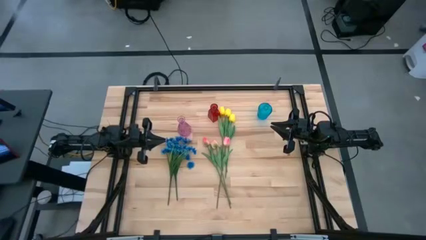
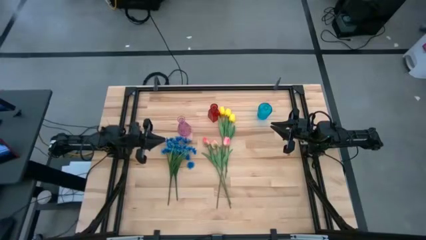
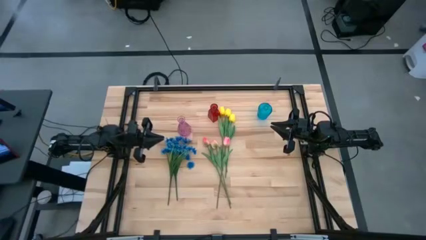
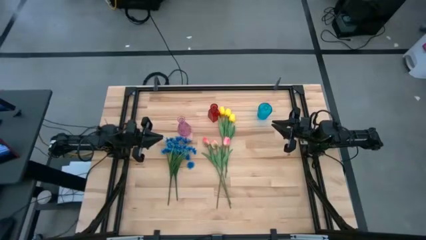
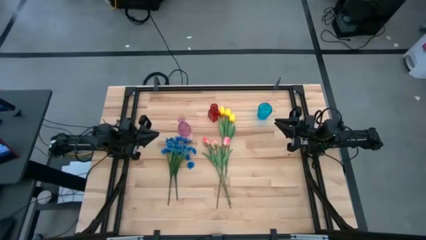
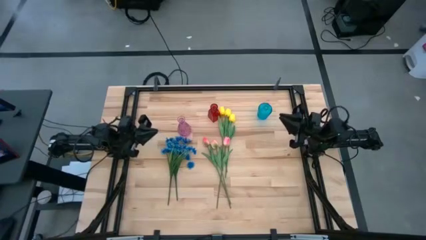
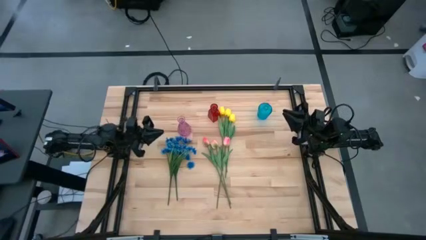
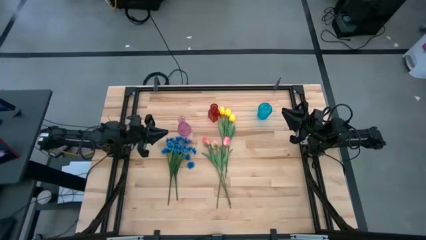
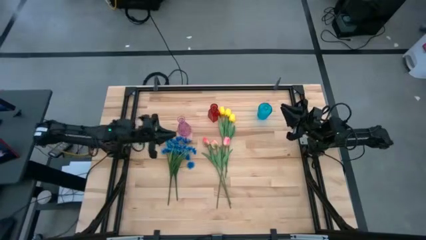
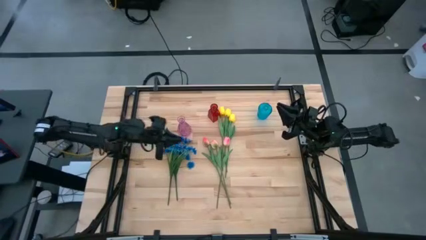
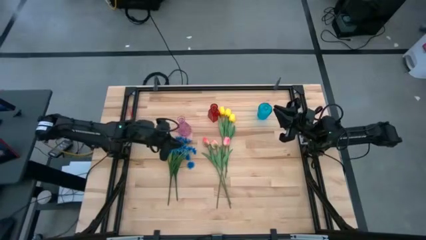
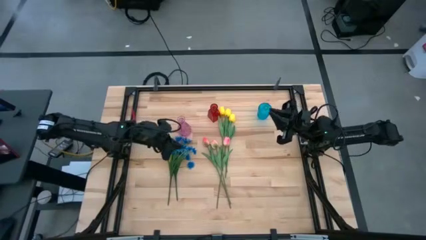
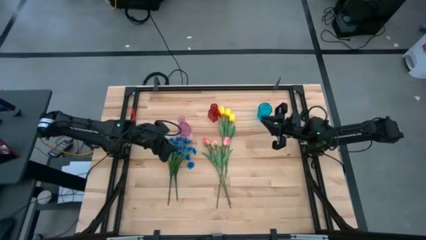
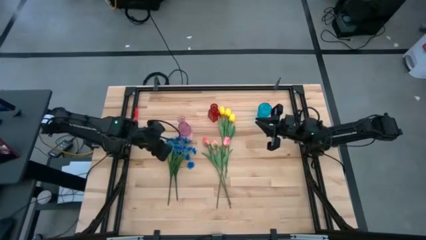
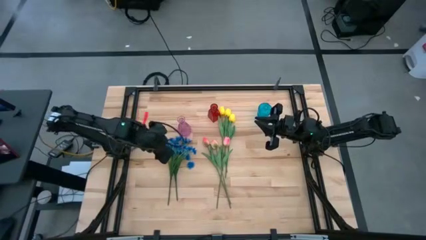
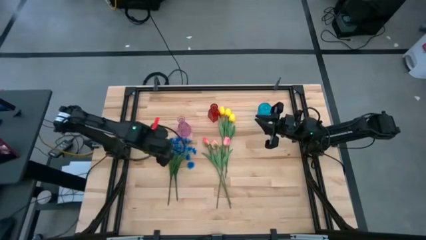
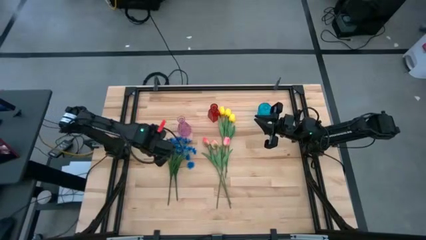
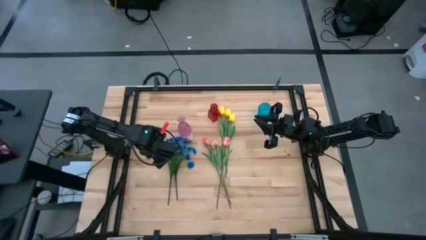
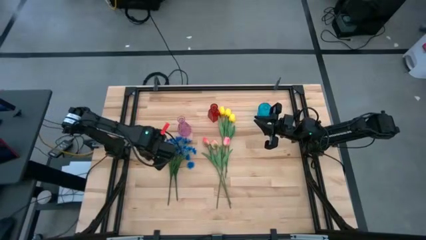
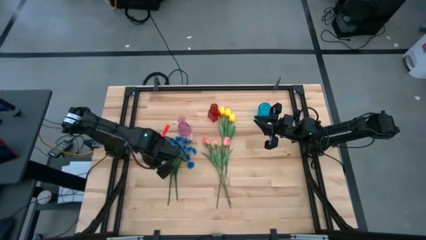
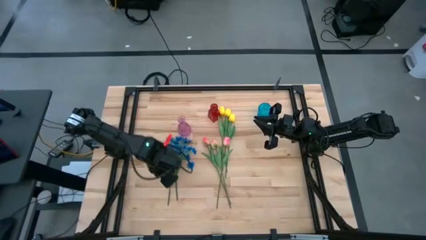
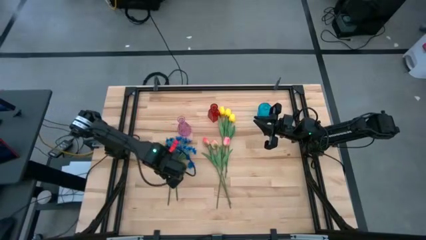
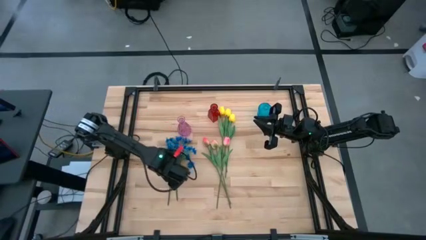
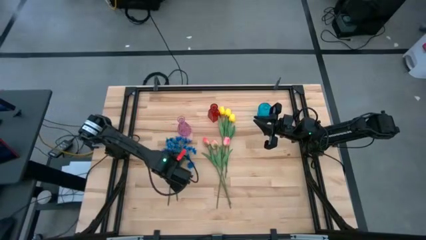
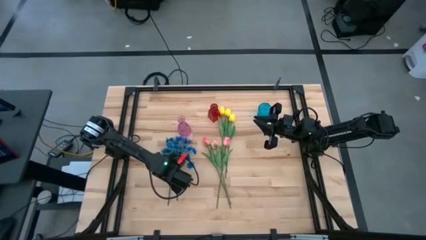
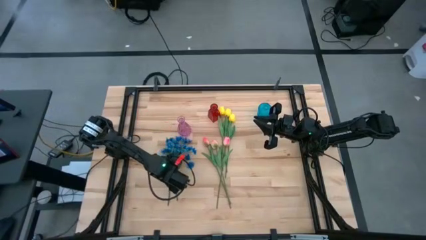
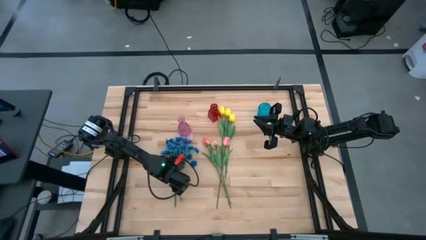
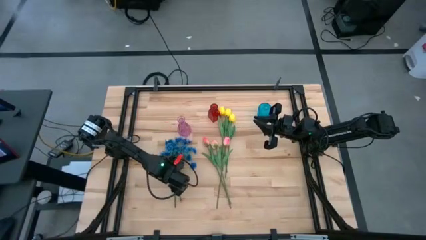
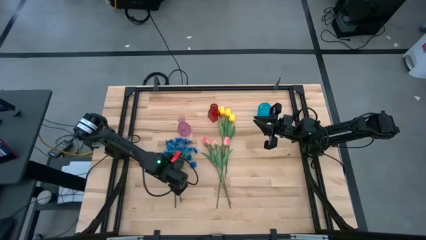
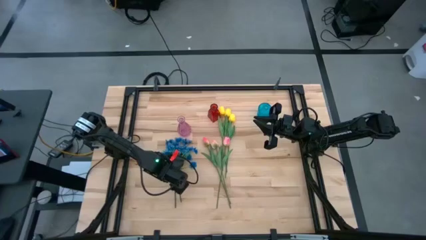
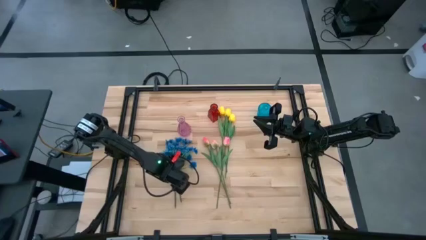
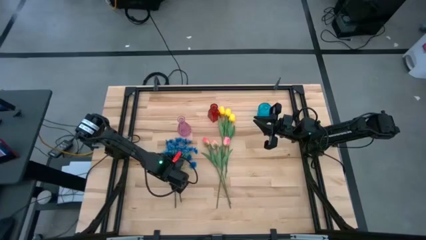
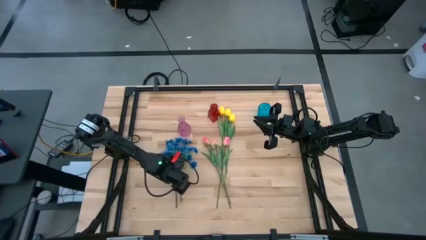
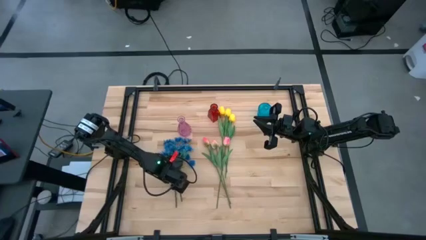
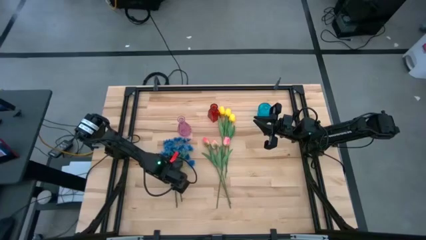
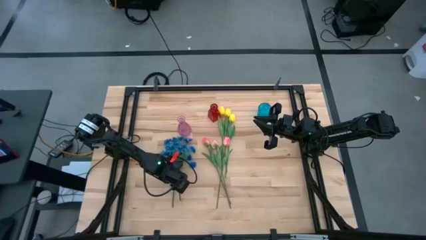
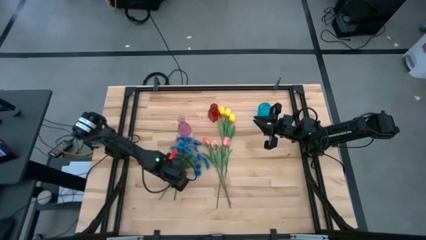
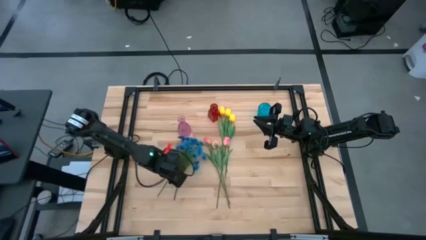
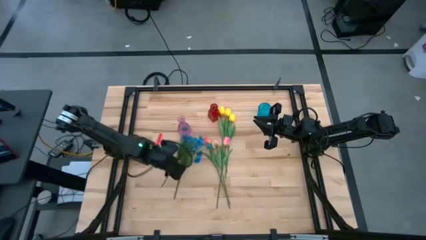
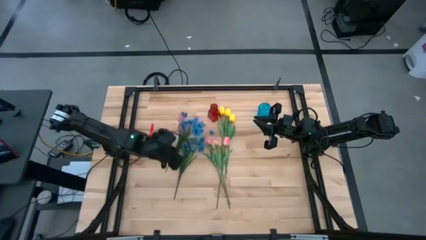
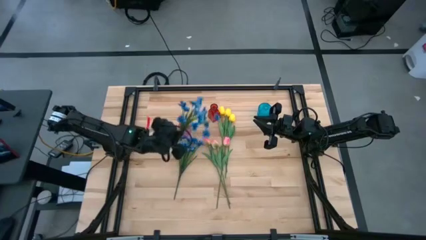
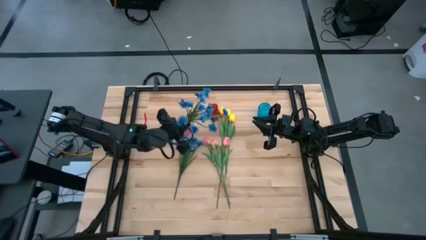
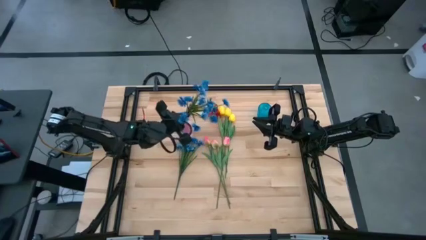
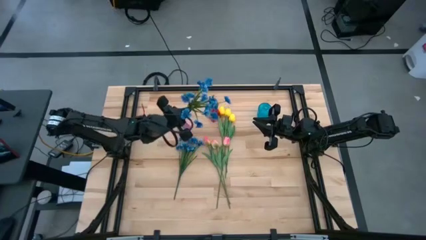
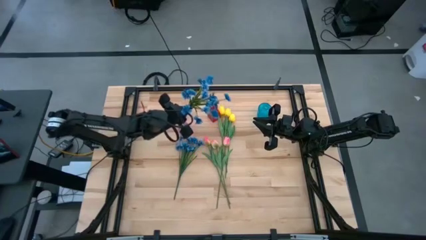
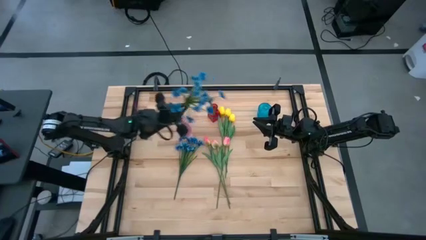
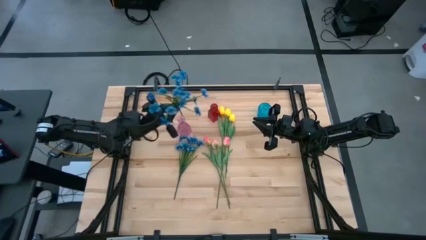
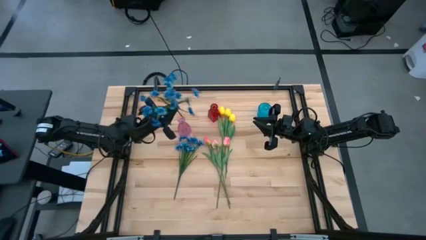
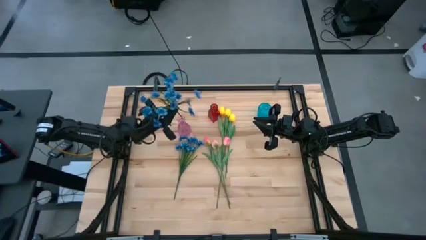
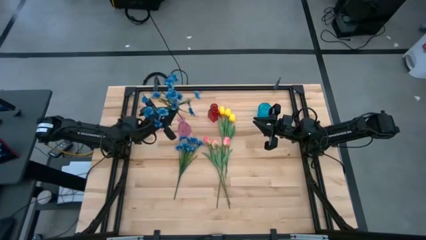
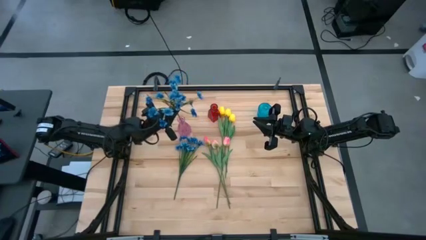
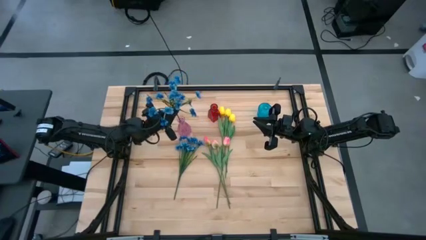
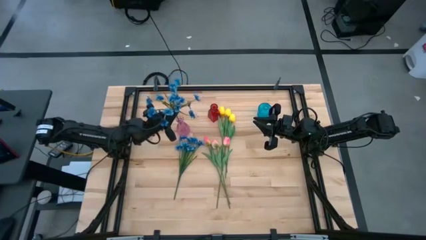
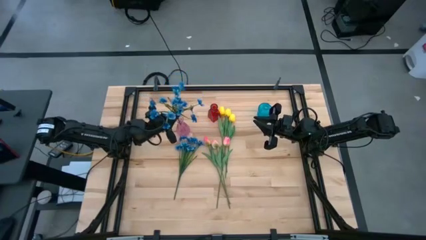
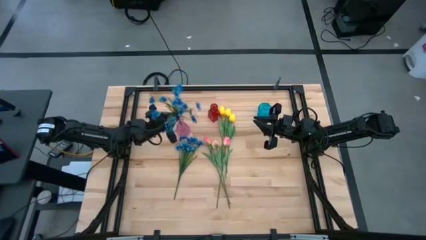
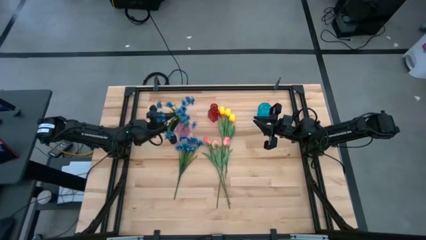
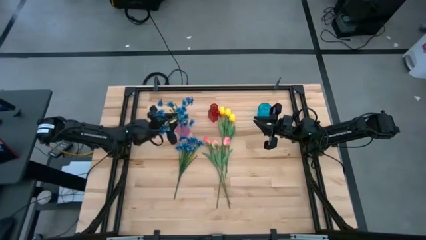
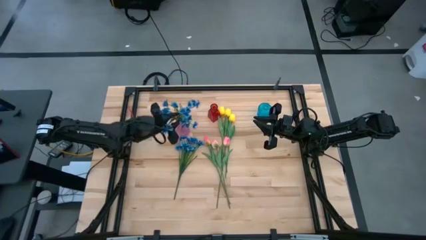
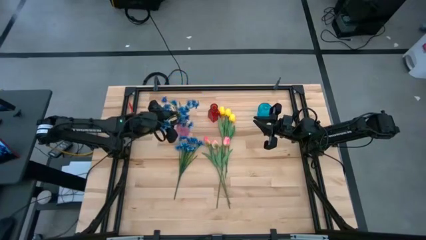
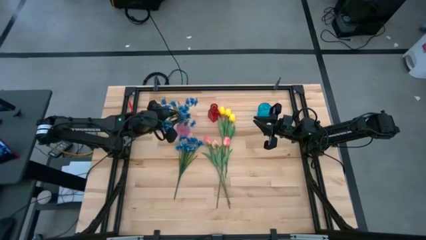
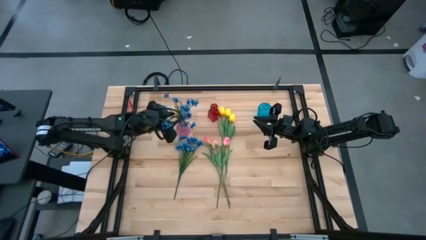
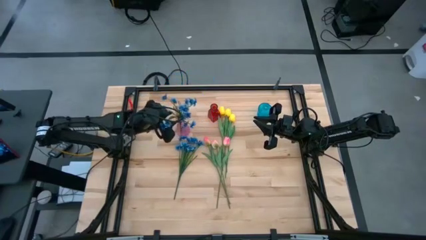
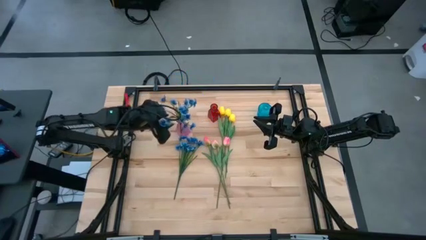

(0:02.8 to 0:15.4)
Task: Sort flowers into vase by color
Put the blue flowers into the pink vase

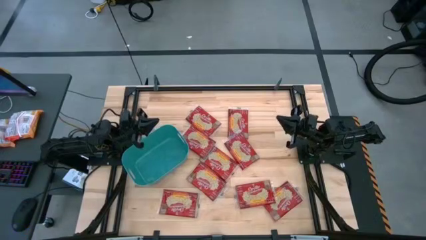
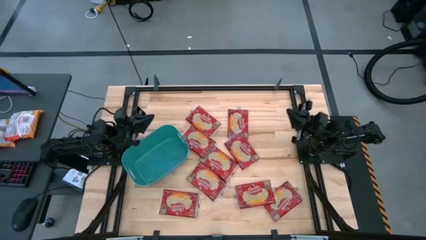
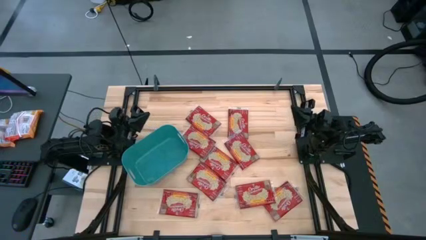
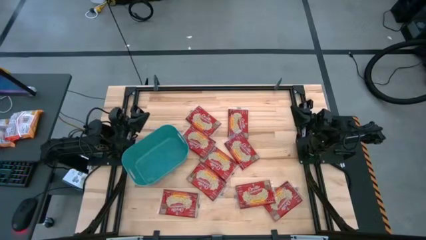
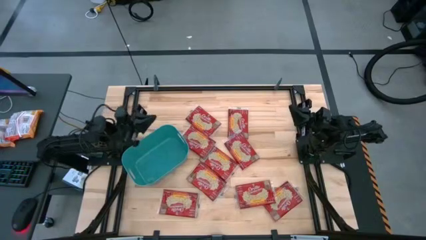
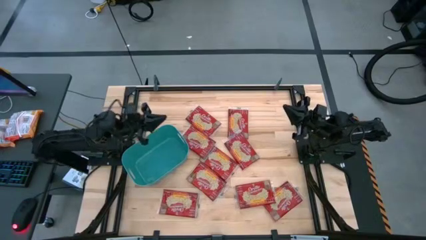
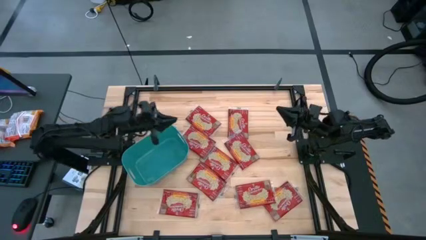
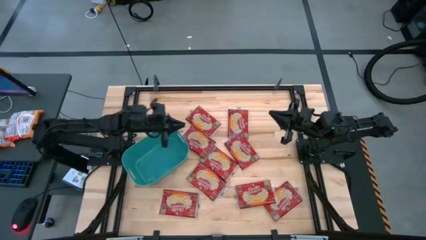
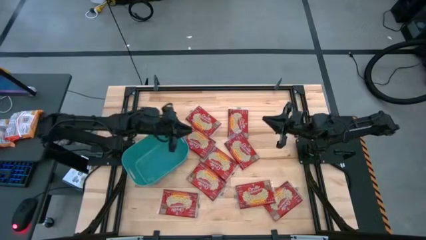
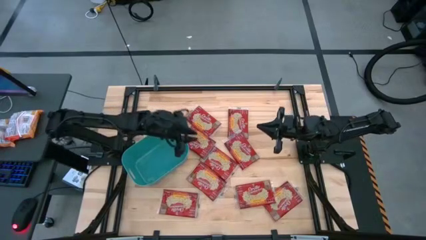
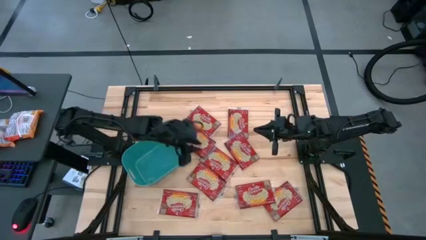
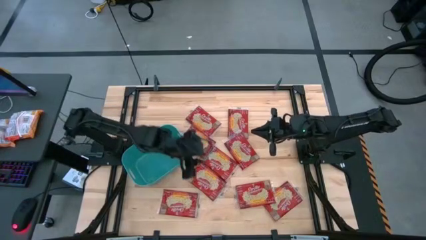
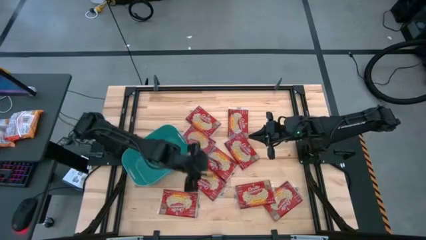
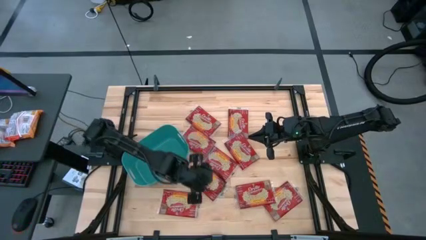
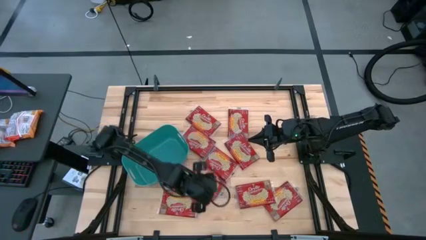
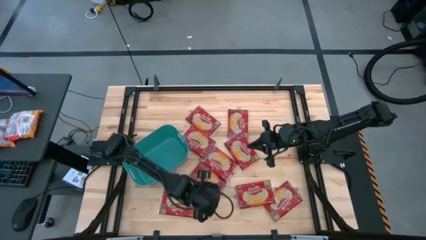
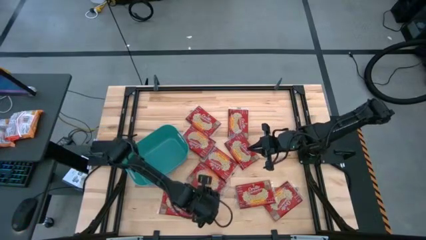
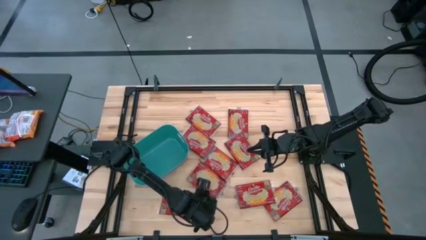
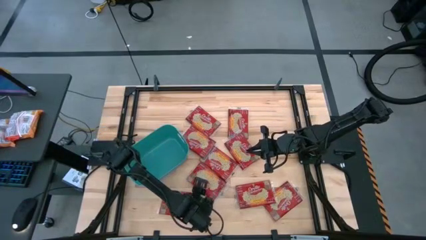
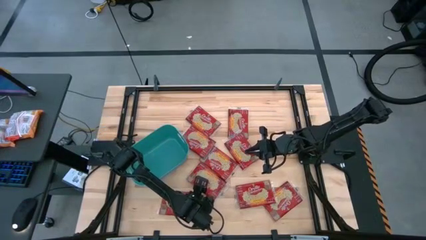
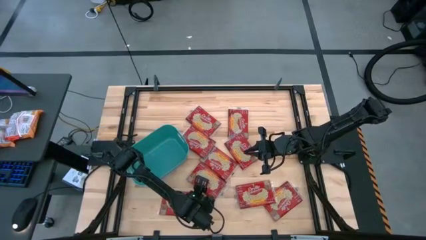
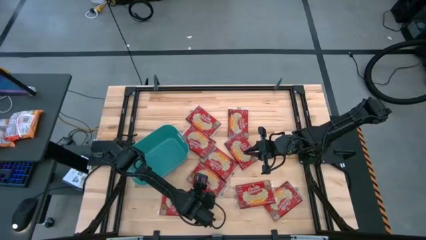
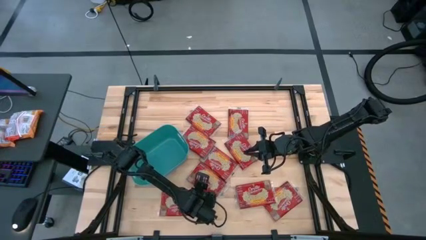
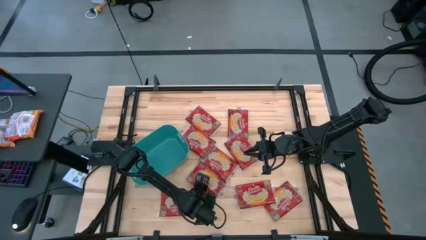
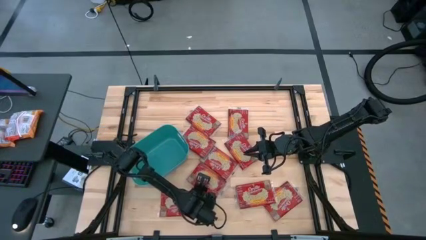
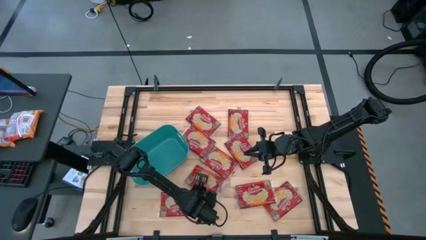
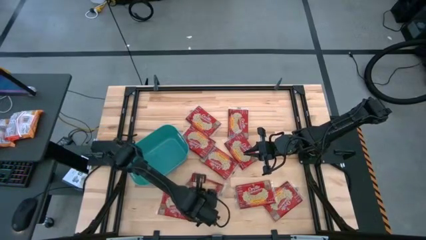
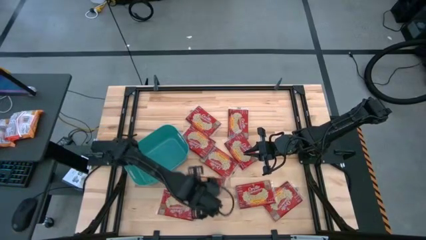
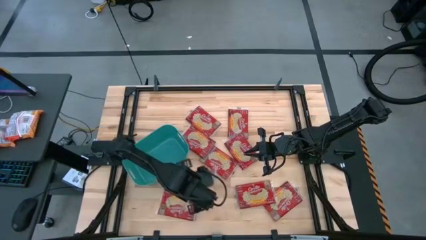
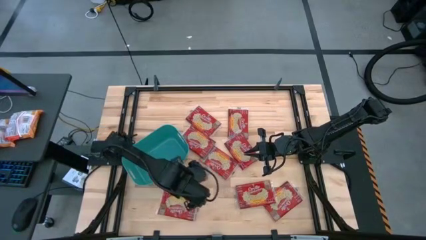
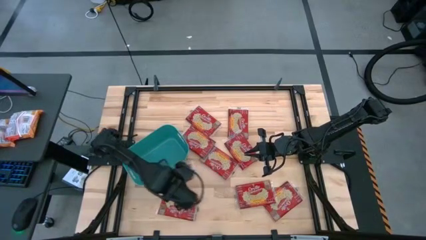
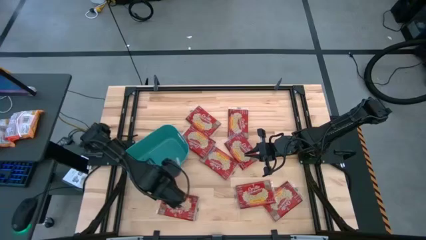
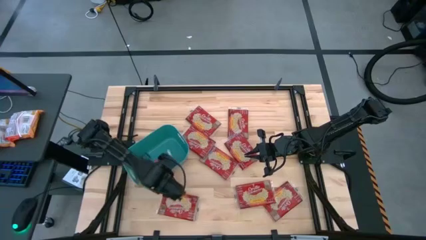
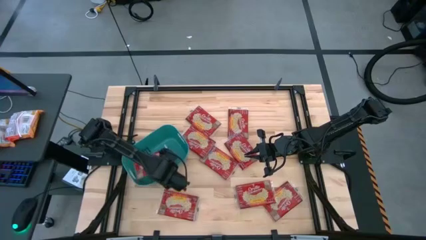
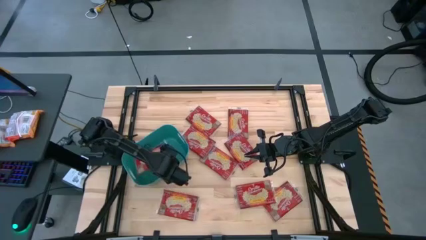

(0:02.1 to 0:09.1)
Task: Sort popcorn bags into baskets
Put the red popcorn bag into the green bin
